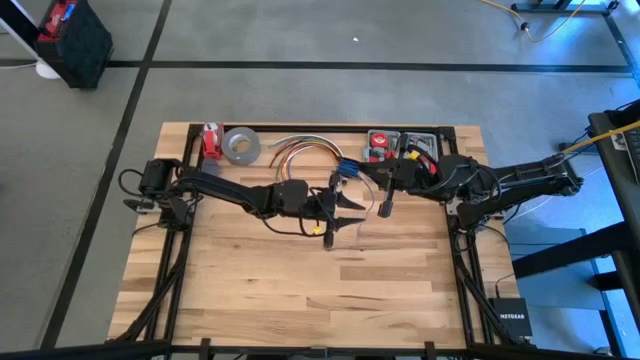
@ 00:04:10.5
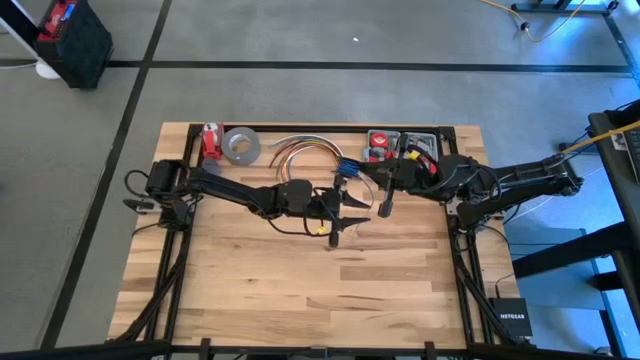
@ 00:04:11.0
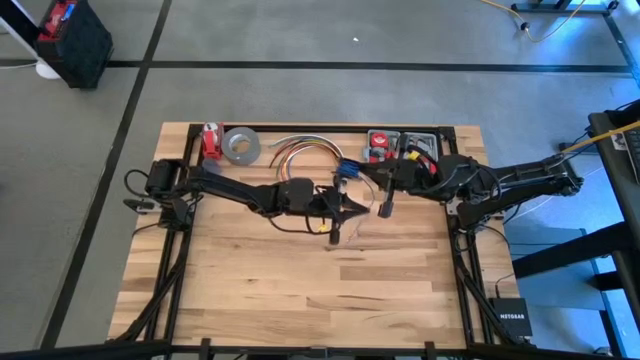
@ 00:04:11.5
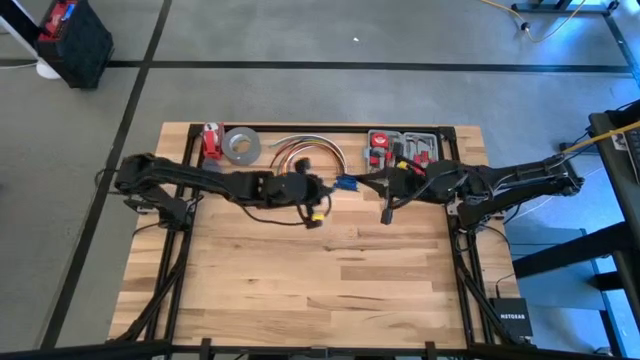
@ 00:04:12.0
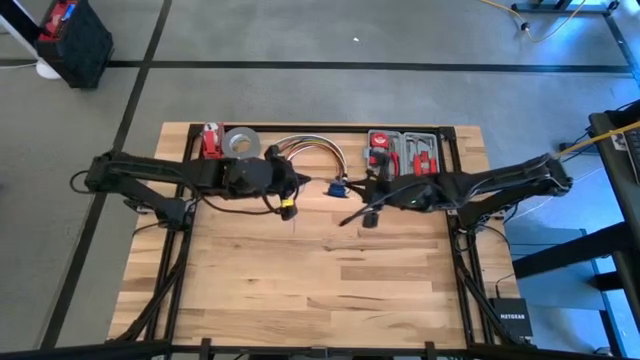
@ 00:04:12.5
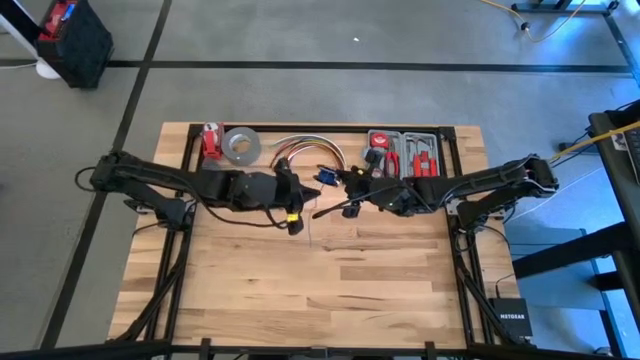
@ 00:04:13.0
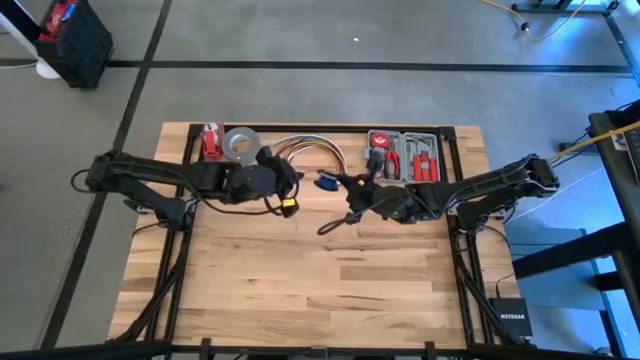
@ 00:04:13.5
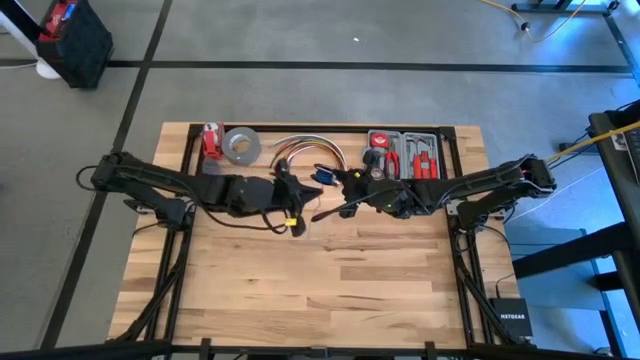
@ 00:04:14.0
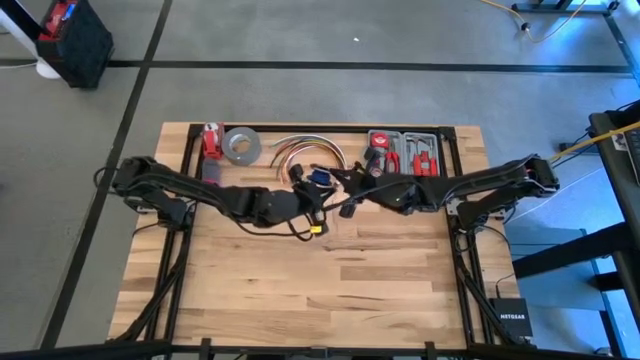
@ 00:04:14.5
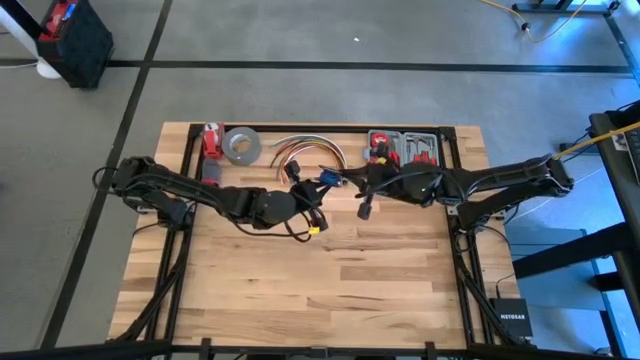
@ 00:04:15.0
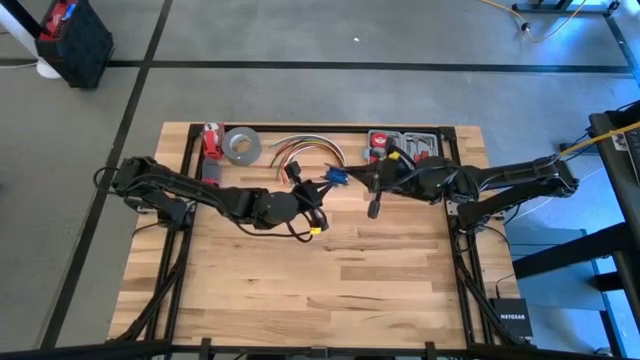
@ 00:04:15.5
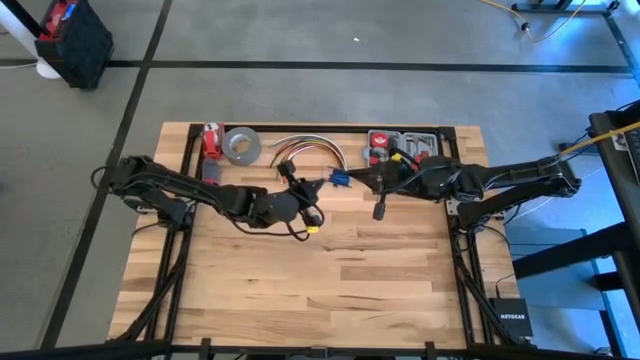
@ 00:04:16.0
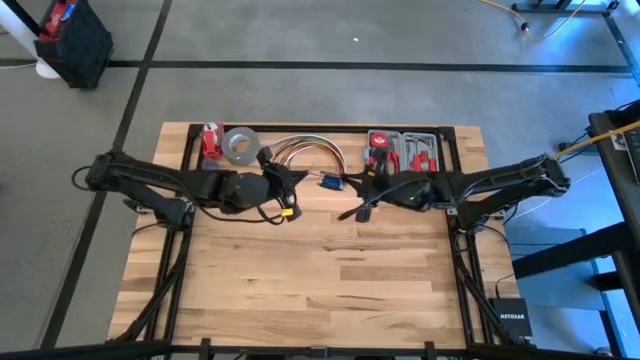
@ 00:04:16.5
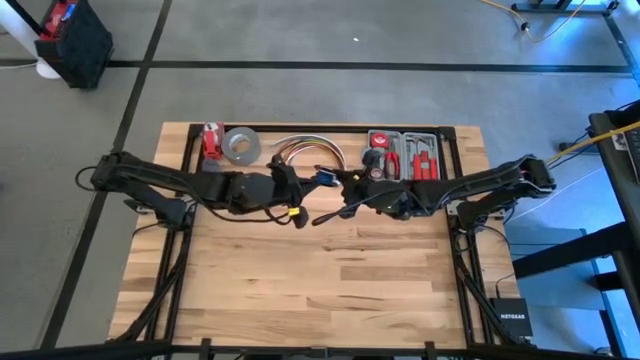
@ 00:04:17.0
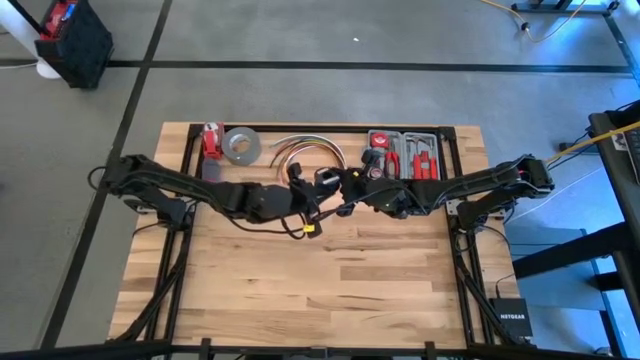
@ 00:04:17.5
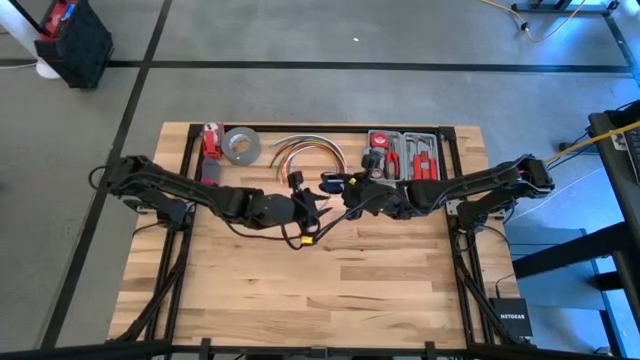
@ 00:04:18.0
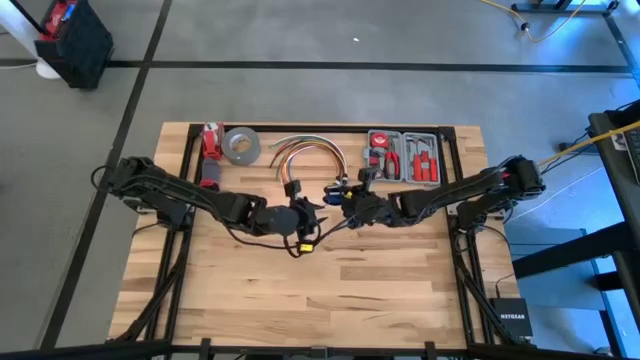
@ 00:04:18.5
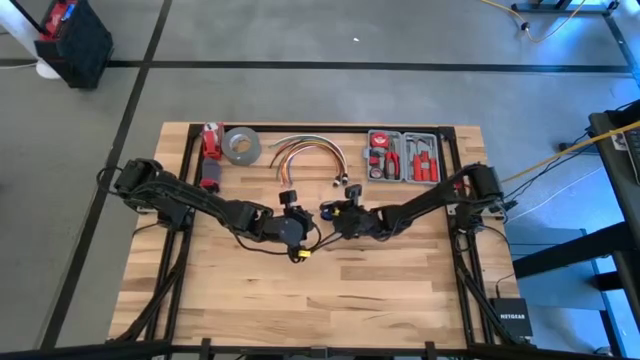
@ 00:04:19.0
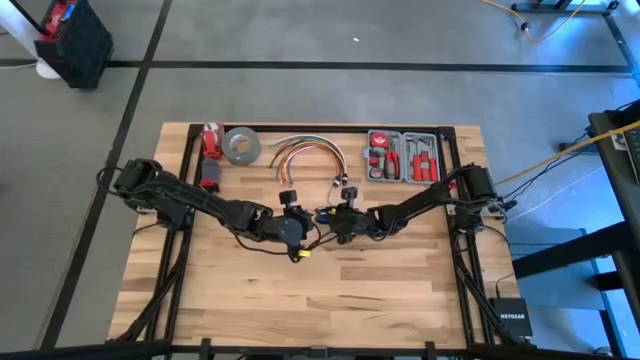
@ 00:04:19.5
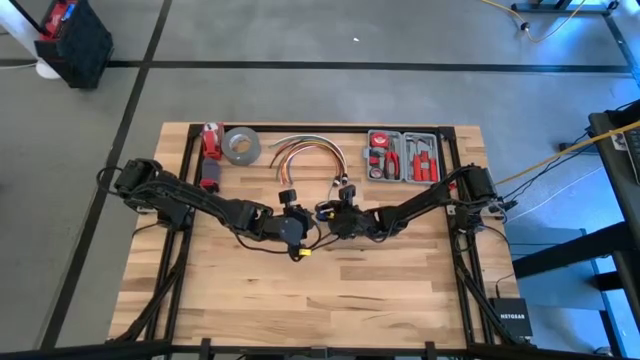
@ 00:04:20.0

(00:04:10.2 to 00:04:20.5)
Task: Coil cords
Coil the blue wire on the black spool

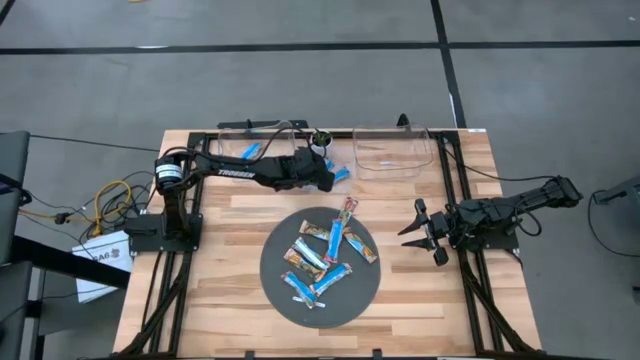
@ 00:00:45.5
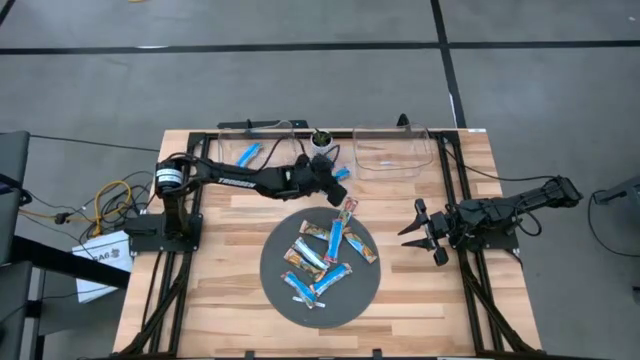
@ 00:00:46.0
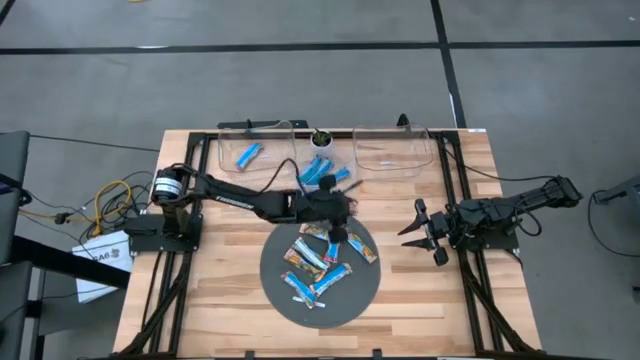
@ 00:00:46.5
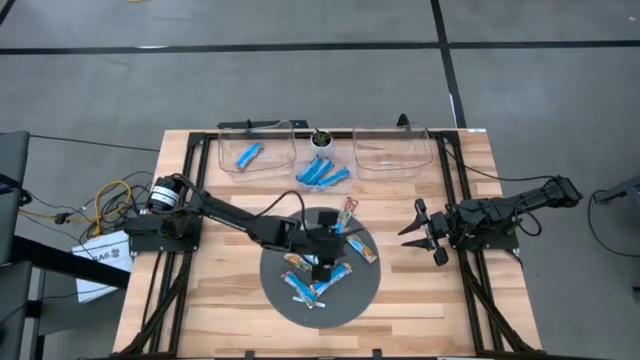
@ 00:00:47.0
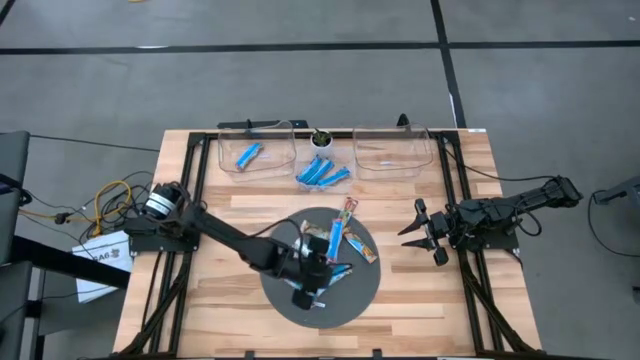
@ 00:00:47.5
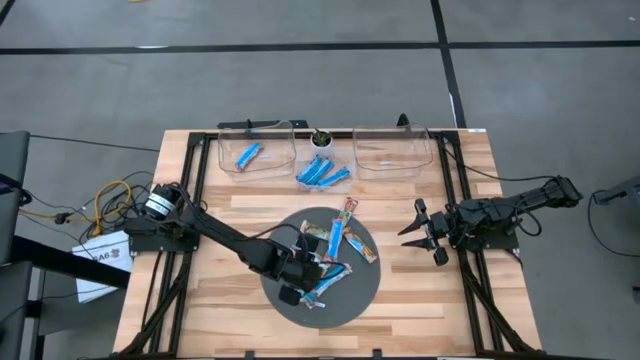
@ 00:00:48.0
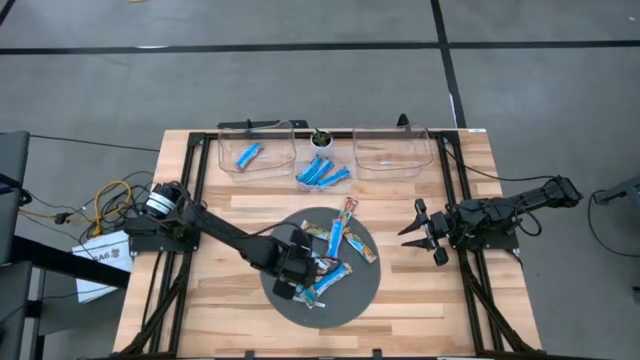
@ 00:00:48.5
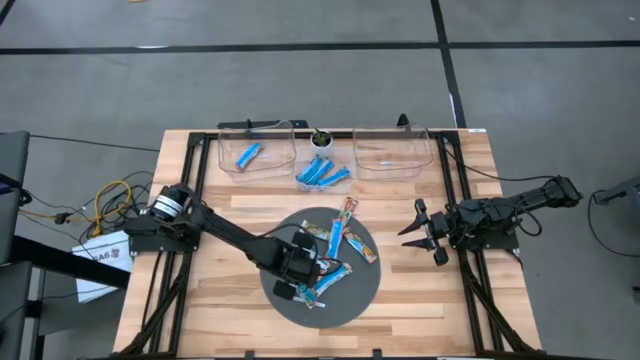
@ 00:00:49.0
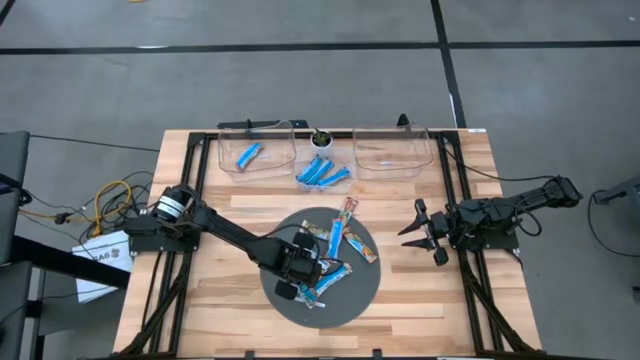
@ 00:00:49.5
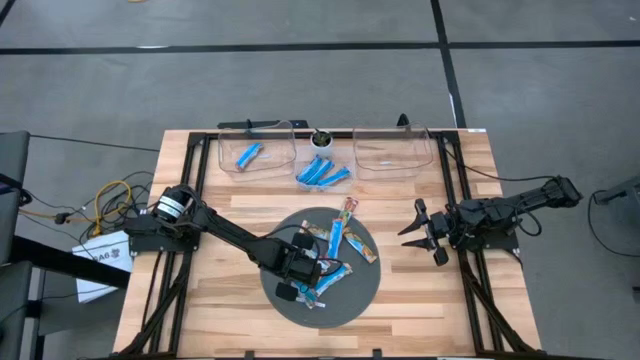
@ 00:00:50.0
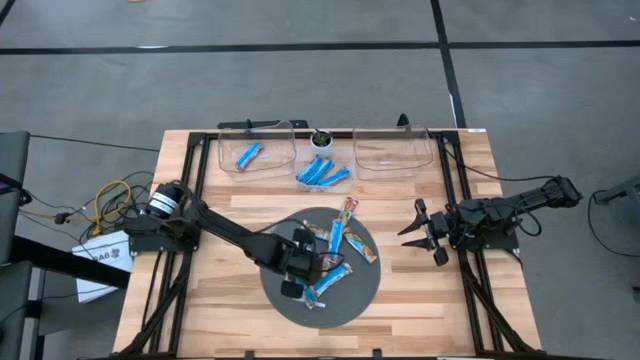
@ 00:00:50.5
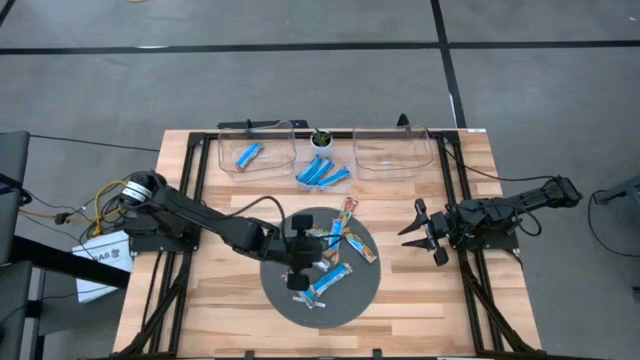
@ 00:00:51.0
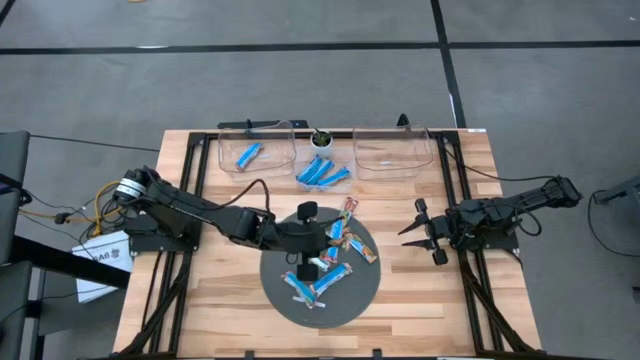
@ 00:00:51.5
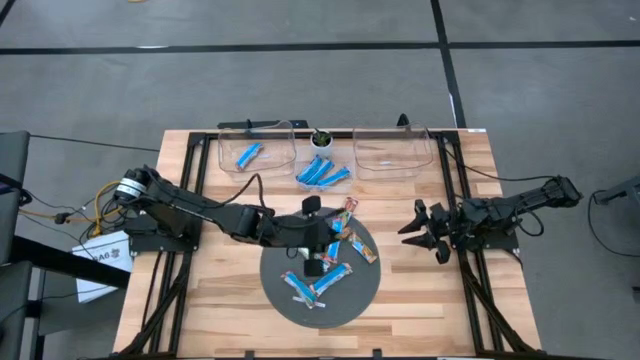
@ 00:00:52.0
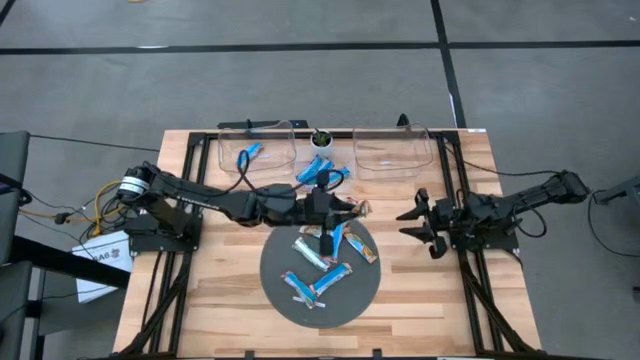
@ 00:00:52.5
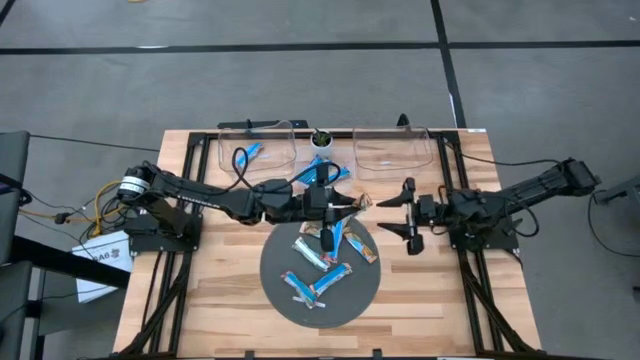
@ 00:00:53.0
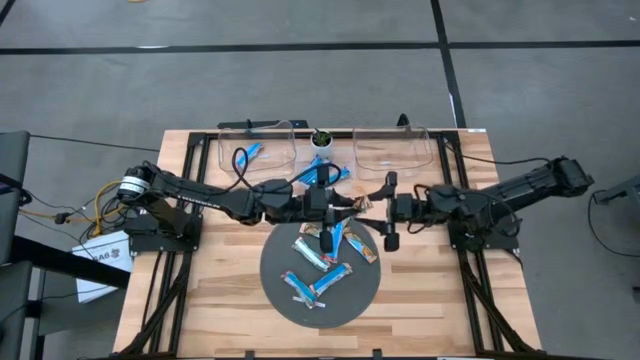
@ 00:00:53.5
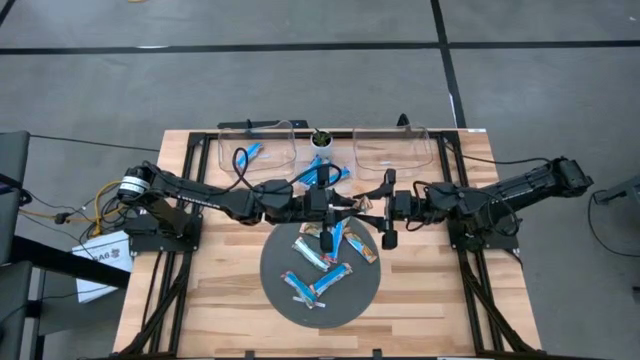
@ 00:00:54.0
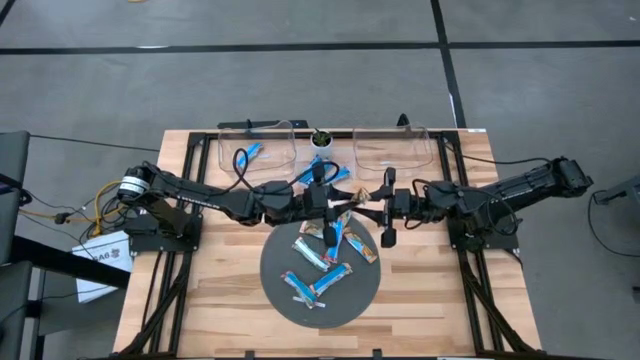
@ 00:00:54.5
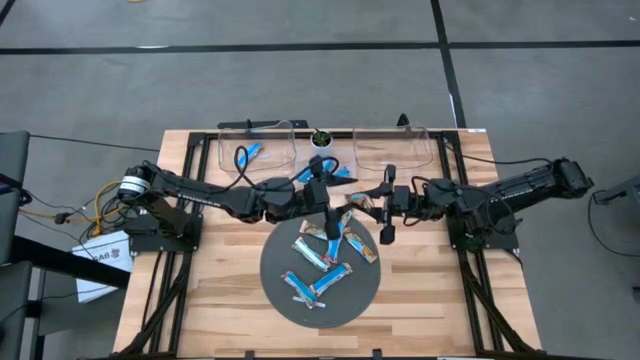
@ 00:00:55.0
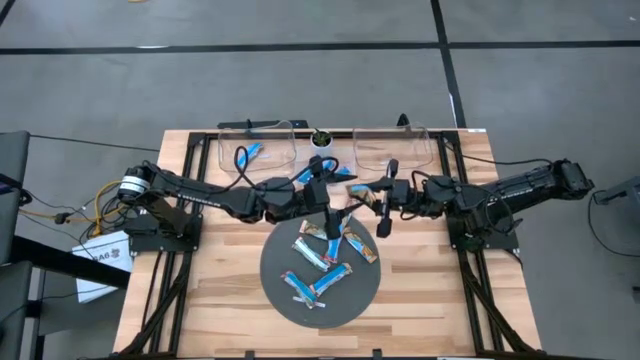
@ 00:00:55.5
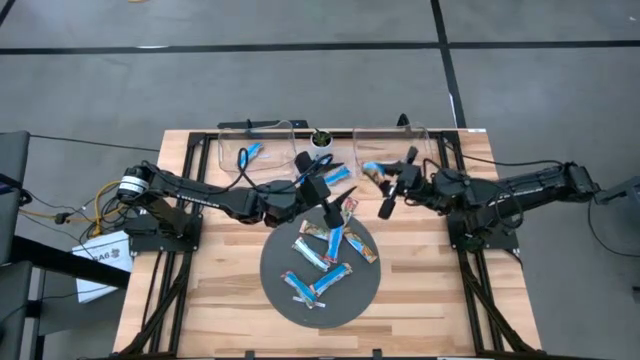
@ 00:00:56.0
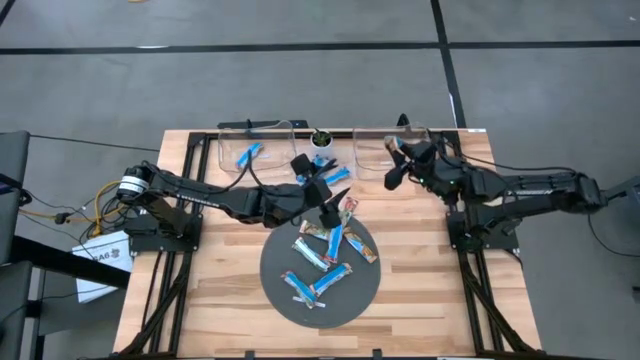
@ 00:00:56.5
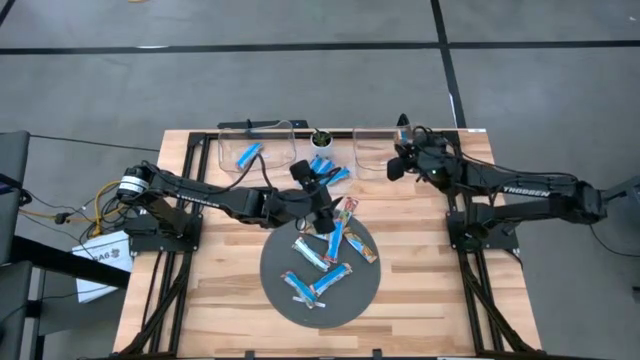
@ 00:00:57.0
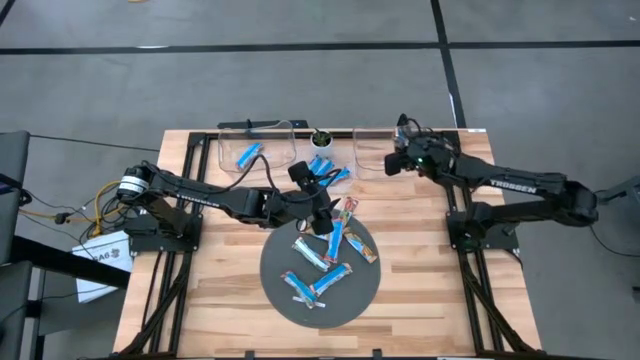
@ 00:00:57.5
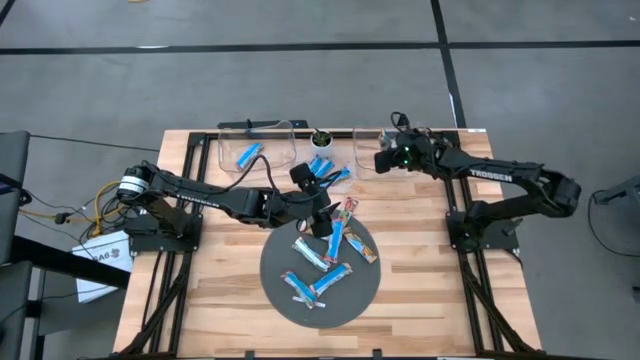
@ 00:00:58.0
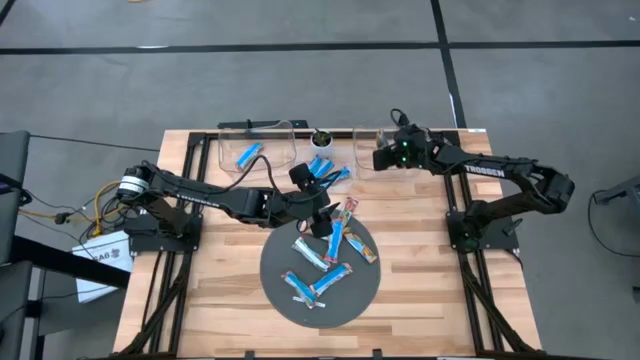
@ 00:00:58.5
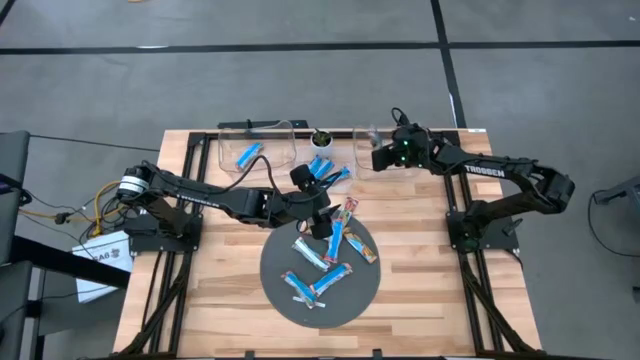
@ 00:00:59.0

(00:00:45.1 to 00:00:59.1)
Task: Pick and place Granola Bars by type
Put the yellow granola bar into the right transparent bin
